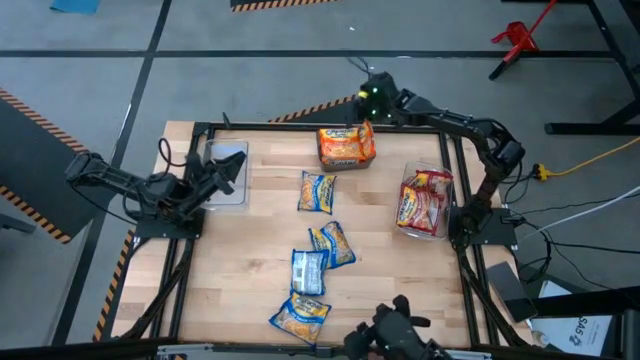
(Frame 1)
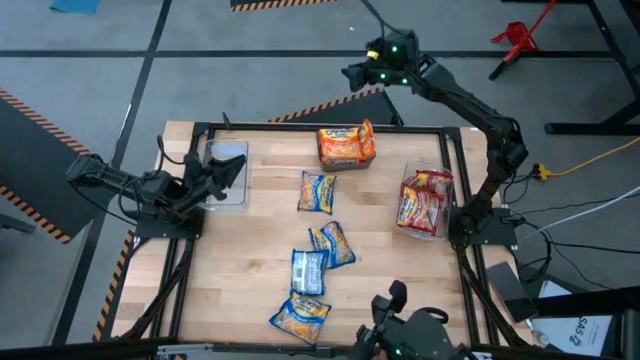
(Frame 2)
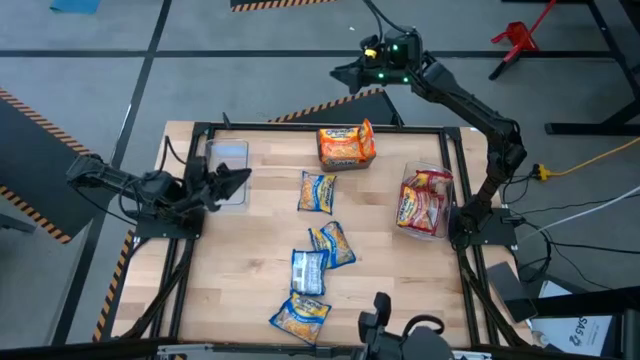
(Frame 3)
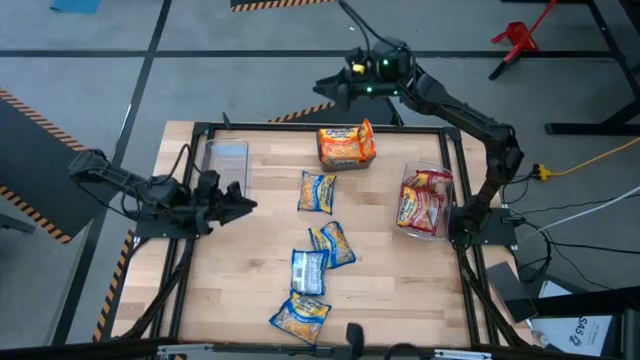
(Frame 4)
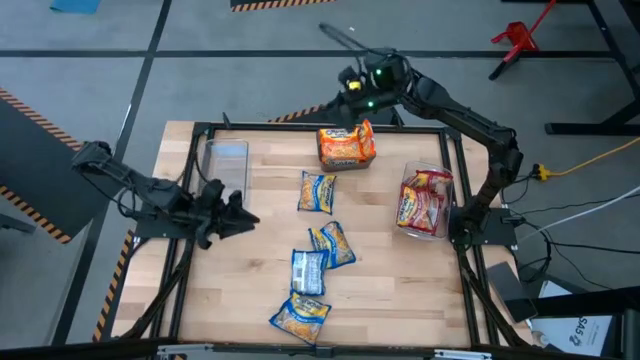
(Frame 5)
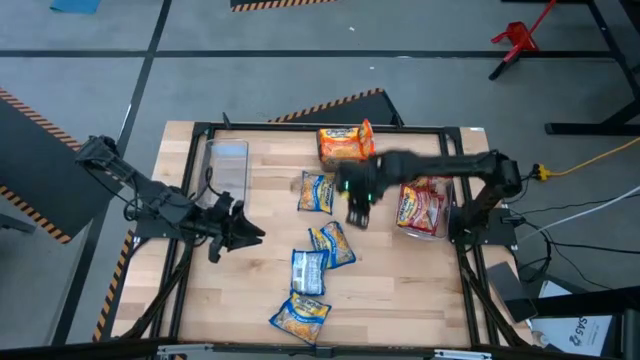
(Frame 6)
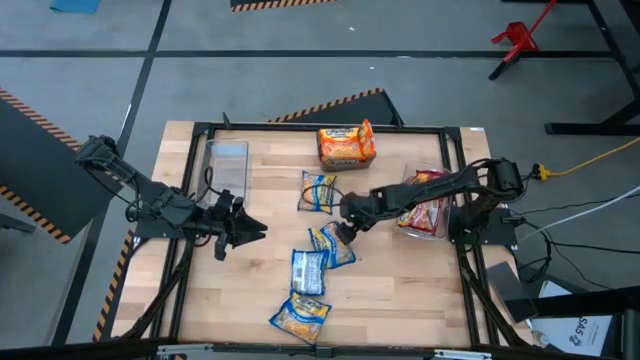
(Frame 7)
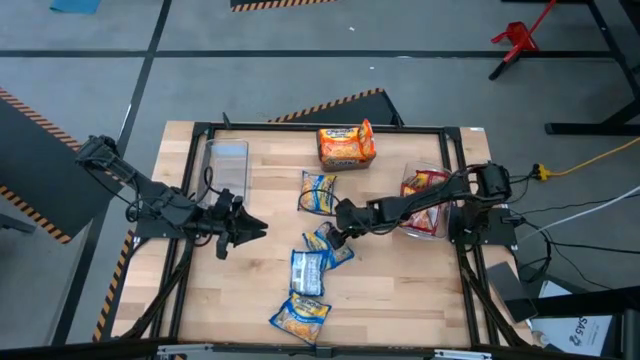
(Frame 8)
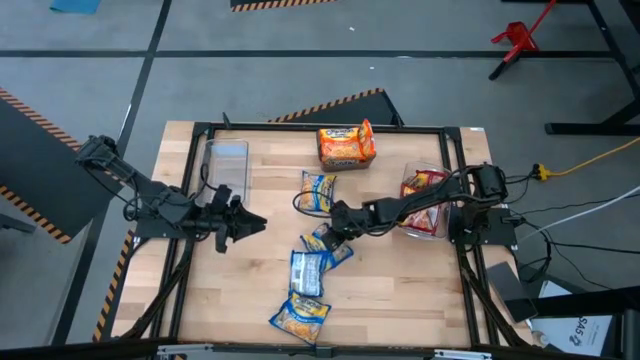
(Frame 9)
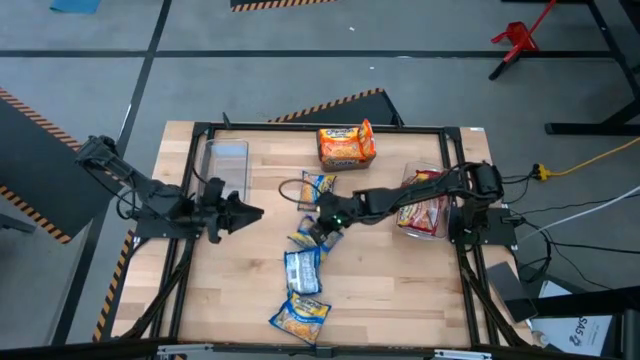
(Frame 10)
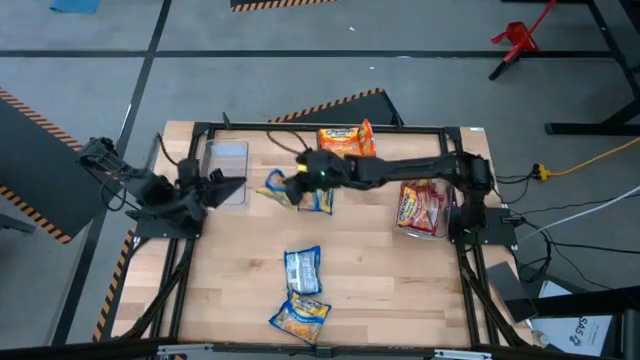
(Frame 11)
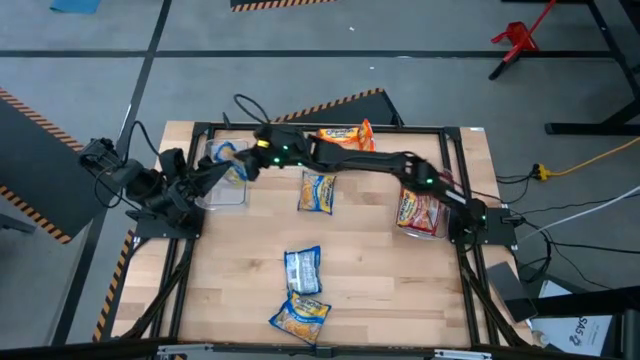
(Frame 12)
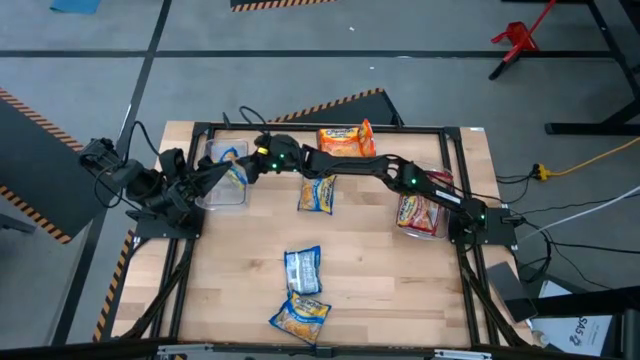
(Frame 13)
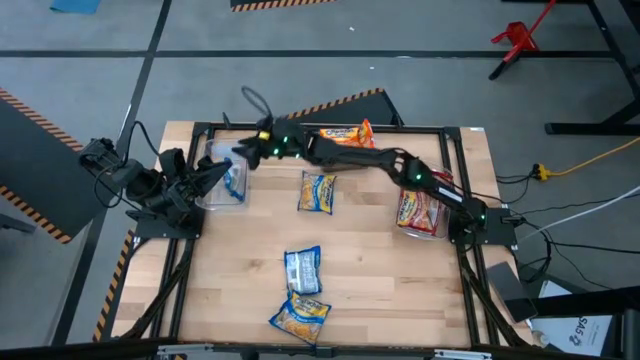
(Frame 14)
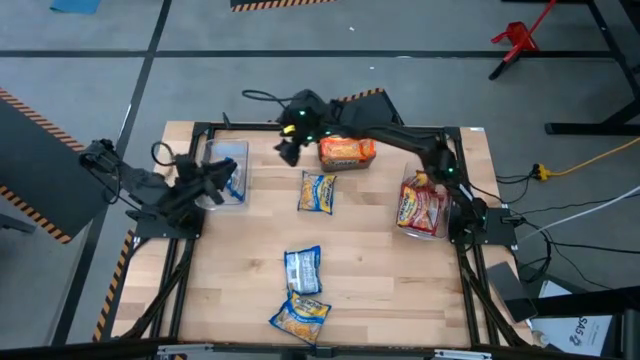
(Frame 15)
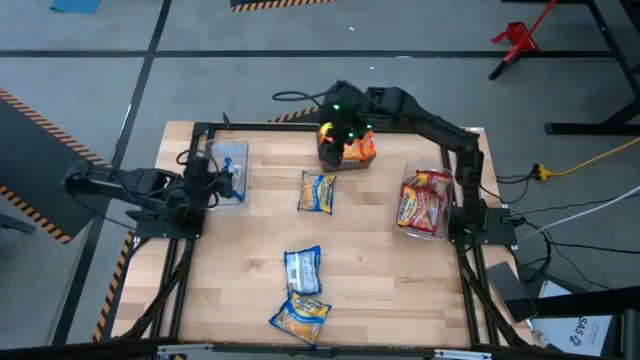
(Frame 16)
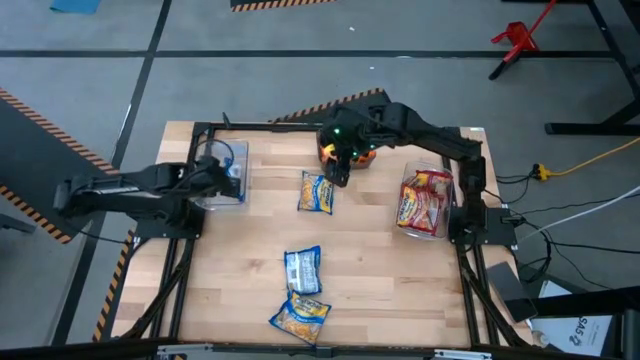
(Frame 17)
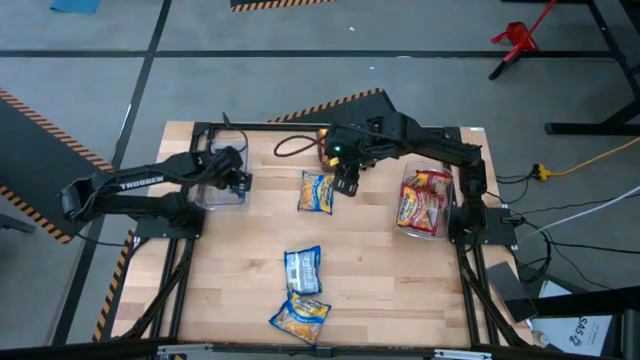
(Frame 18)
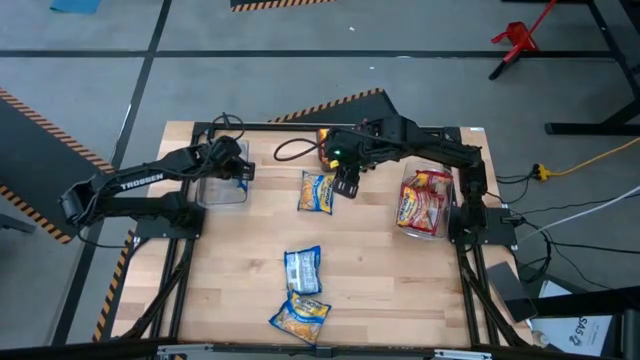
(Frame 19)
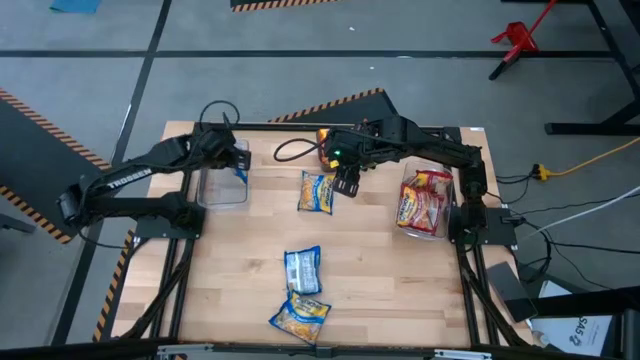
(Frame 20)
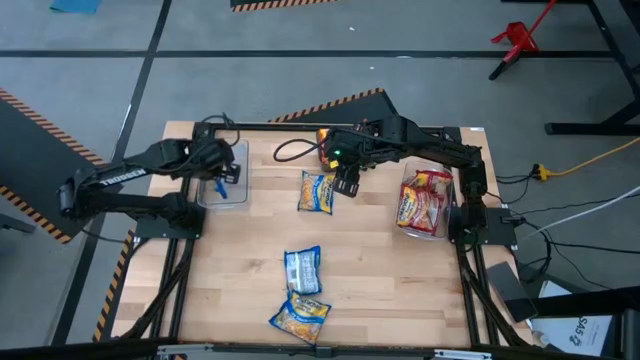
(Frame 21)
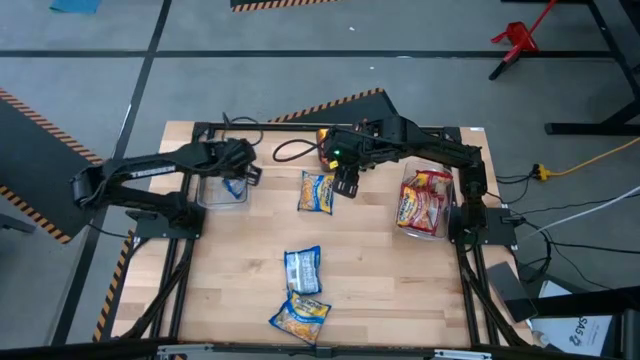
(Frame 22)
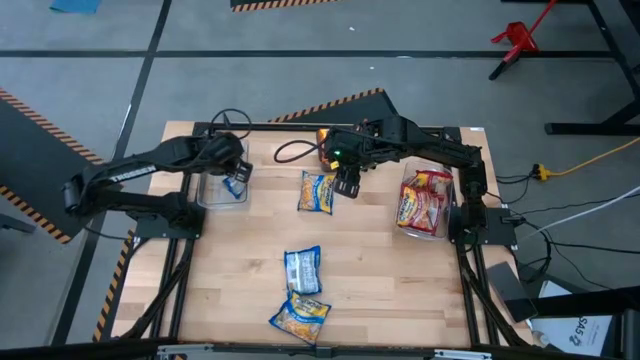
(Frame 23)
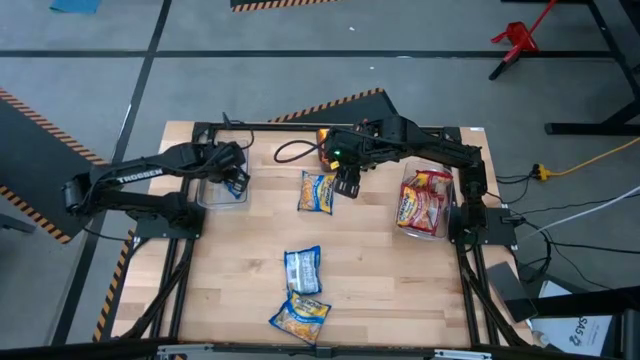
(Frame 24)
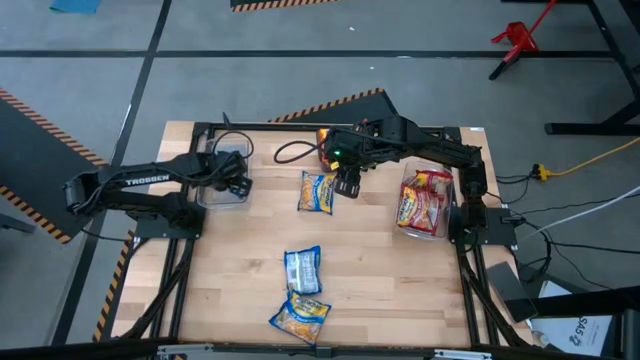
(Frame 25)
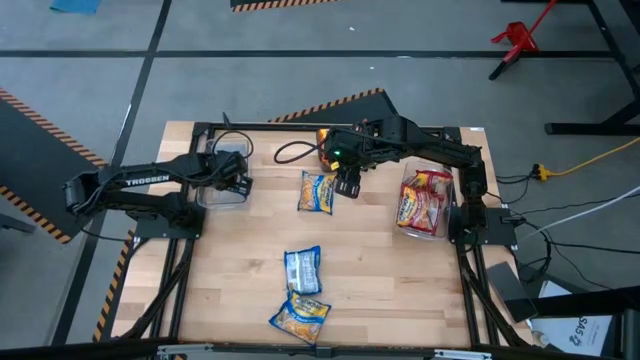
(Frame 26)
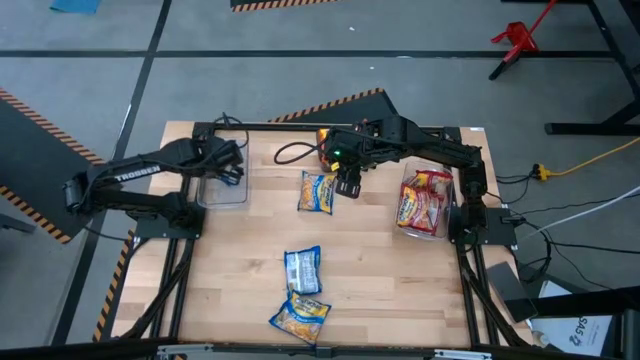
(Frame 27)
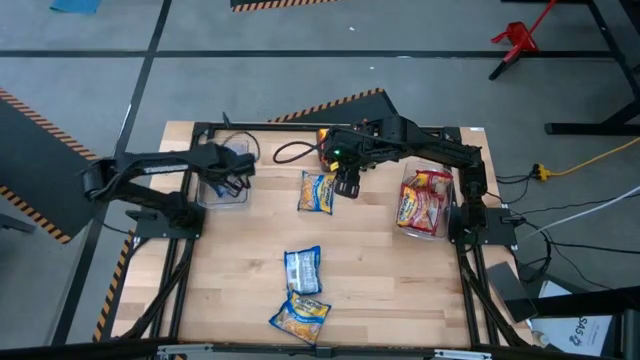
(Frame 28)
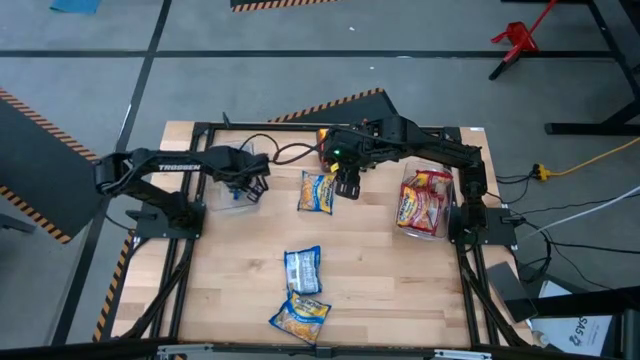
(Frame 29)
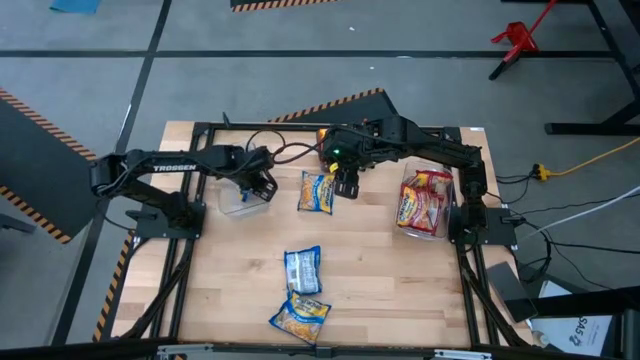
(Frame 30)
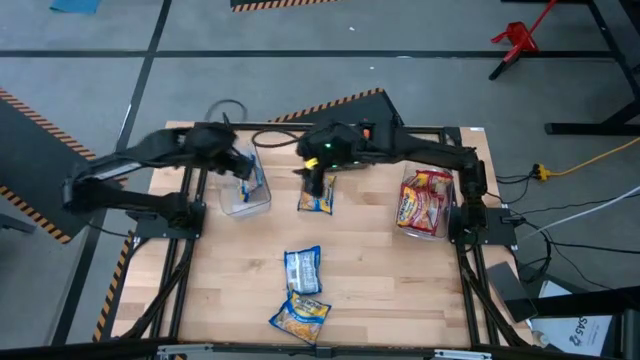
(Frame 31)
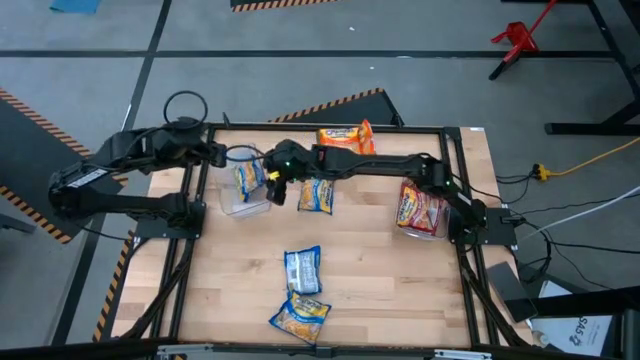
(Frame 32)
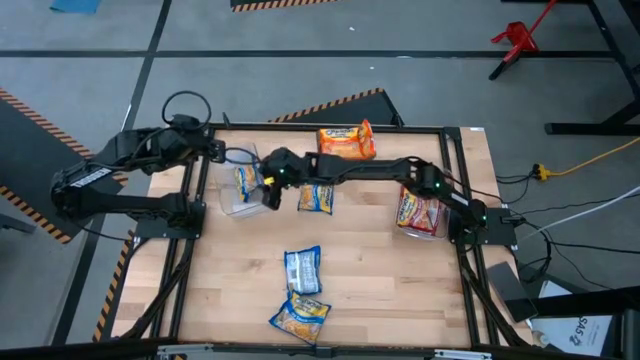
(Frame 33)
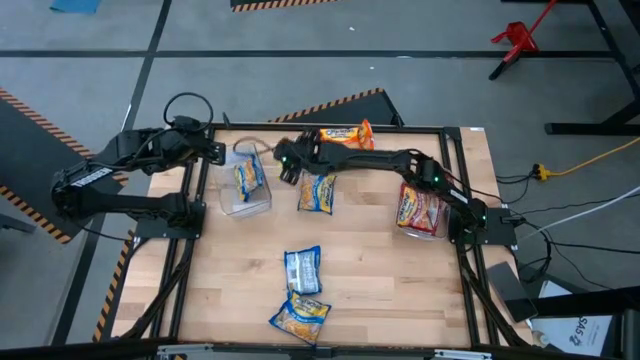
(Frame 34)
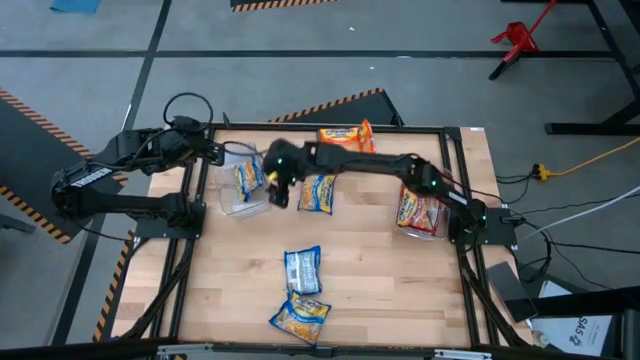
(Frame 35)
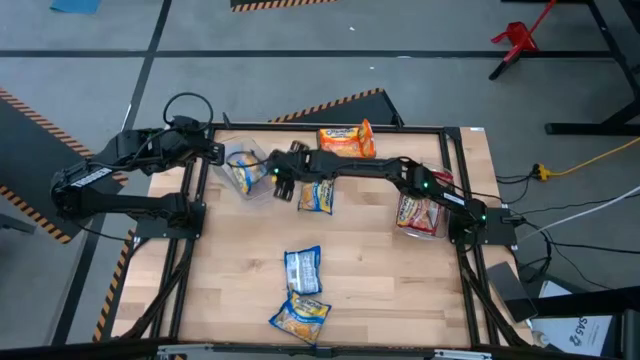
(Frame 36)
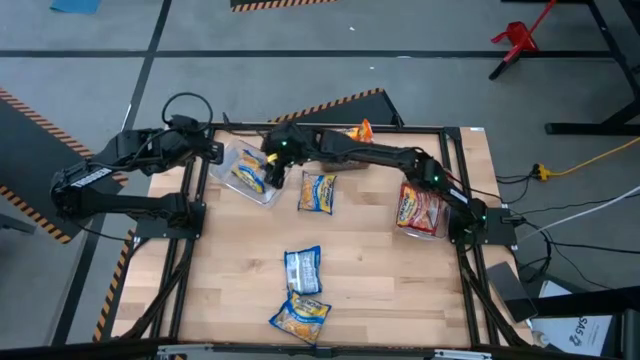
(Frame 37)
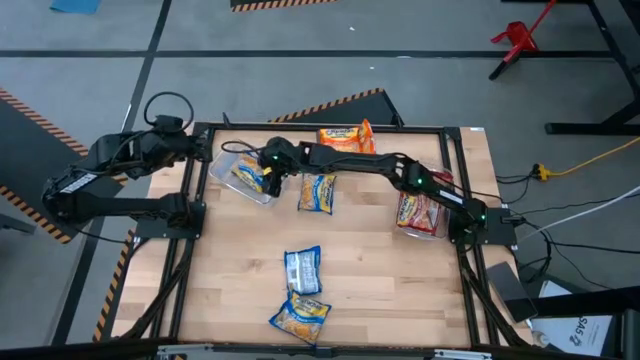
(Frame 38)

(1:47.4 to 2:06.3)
Task: Sort Maruchan noodles
Put the blue noodle pack into the left transparent bin

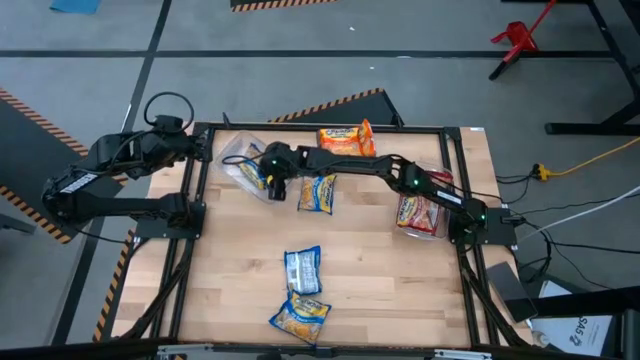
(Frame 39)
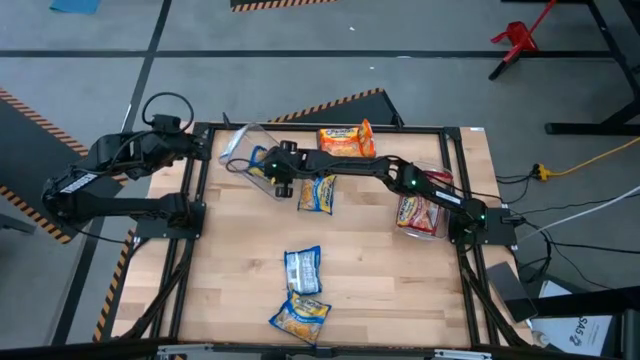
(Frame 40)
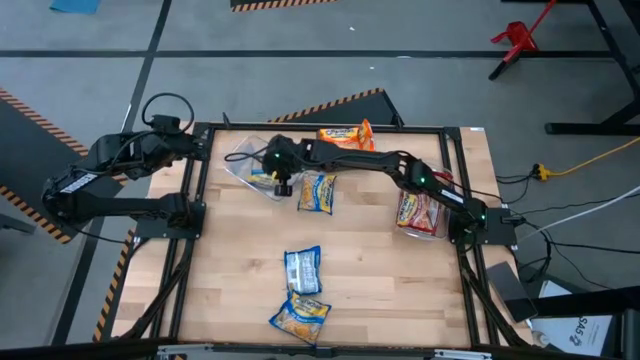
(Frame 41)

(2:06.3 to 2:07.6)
Put the blue noodle pack into the left transparent bin

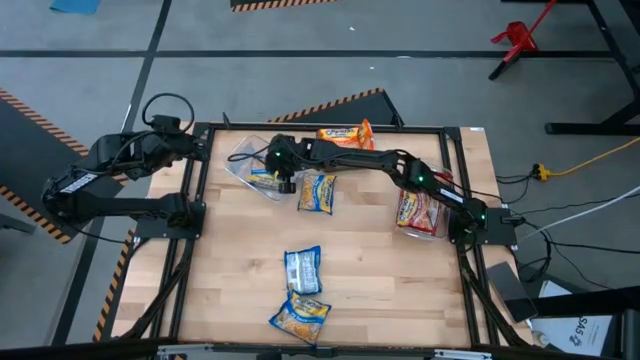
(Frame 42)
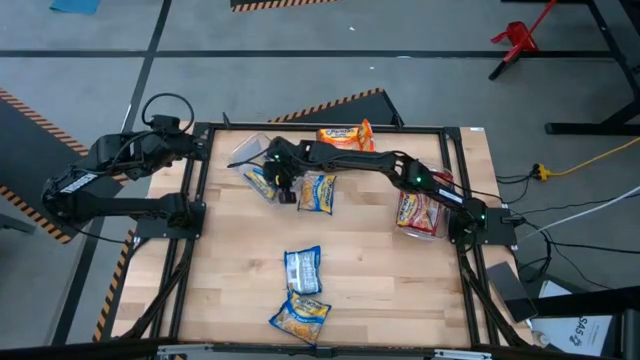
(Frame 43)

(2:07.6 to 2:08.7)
Put the blue noodle pack into the left transparent bin

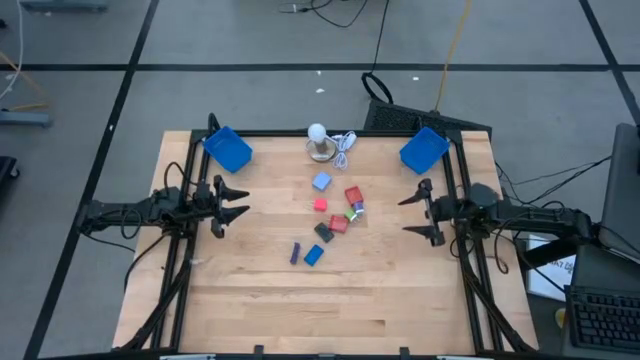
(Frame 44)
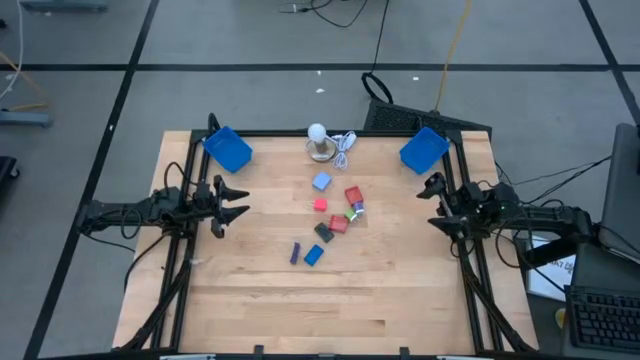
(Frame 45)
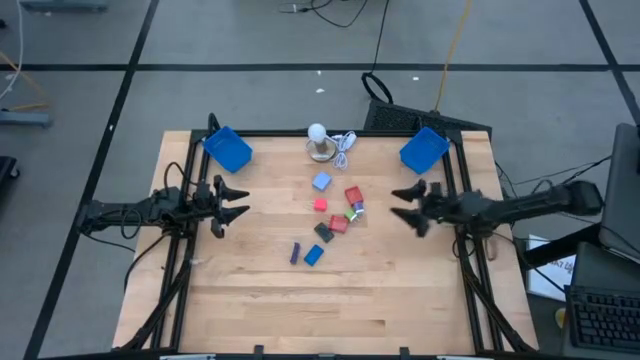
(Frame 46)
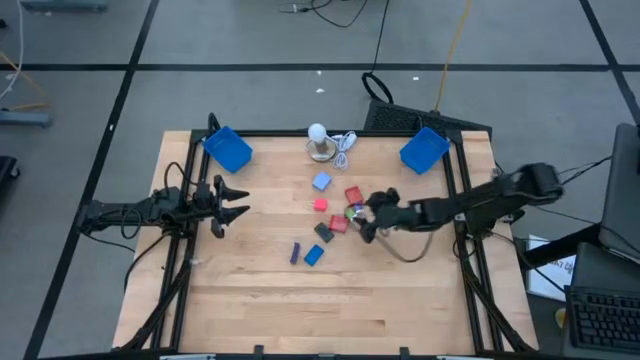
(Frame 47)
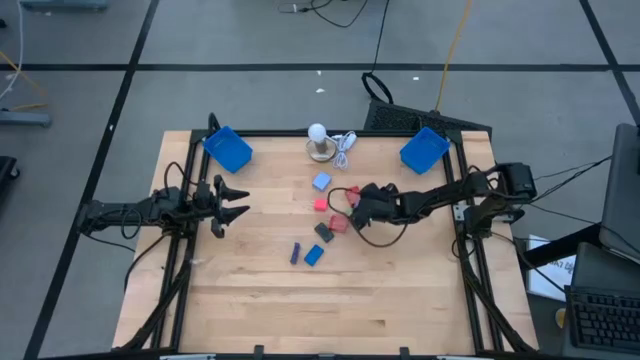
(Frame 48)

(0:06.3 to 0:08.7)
Task: Pick & Place Office items
Put the violet charger adapter into the right blue bin
